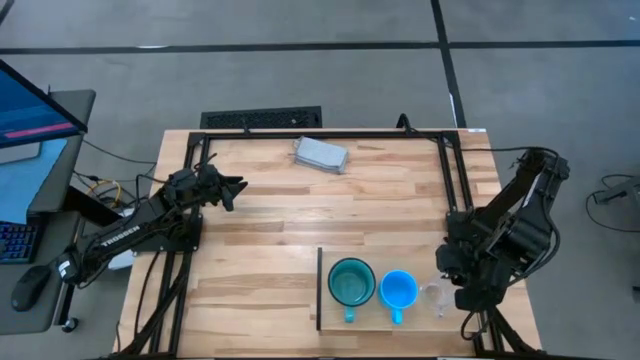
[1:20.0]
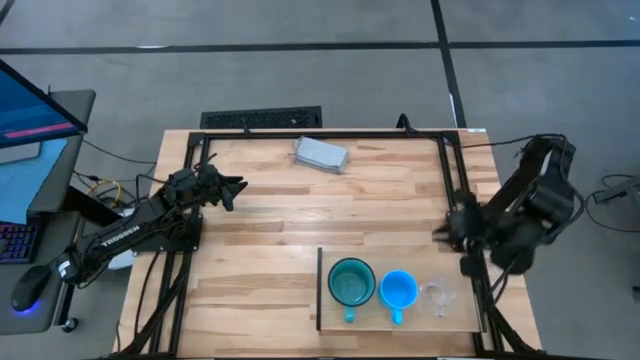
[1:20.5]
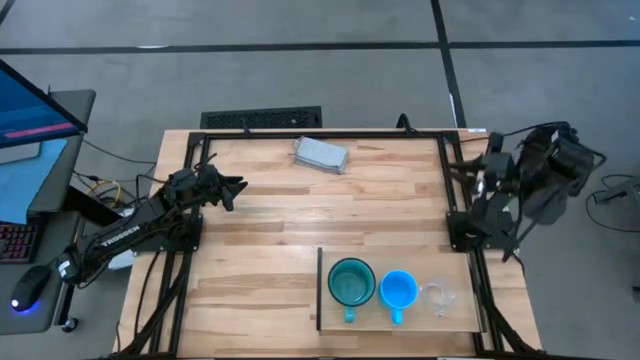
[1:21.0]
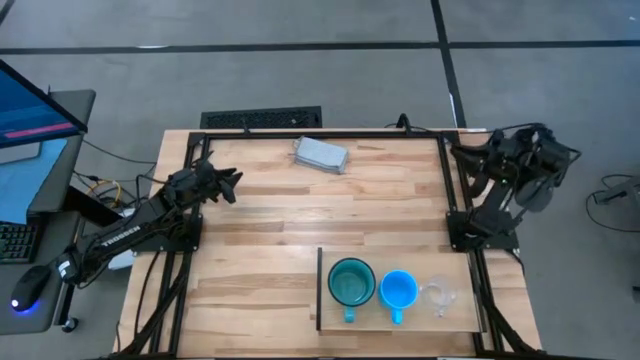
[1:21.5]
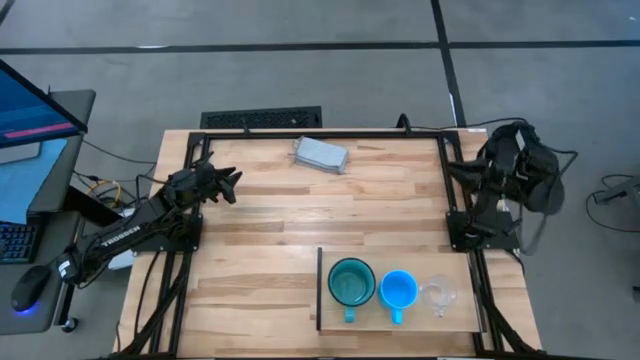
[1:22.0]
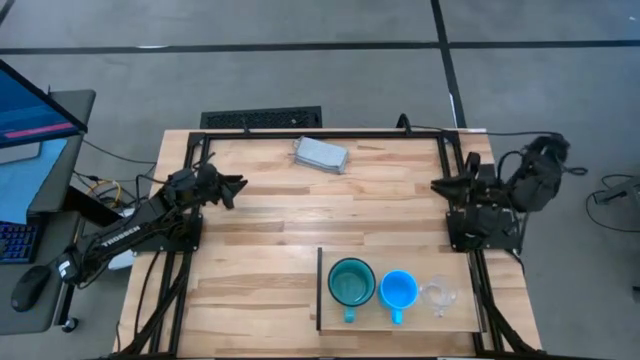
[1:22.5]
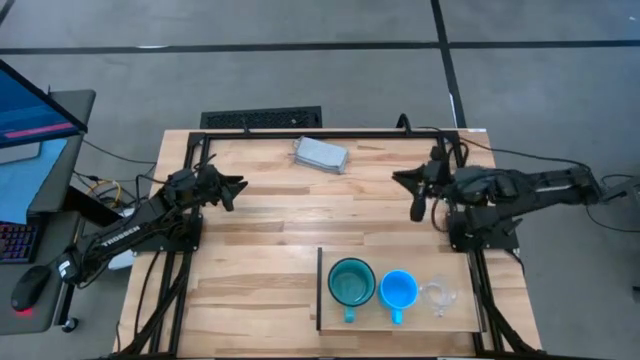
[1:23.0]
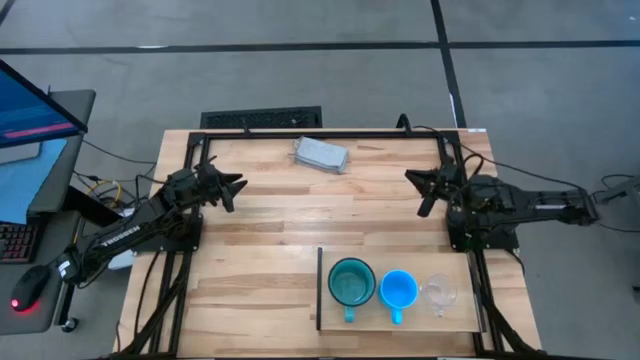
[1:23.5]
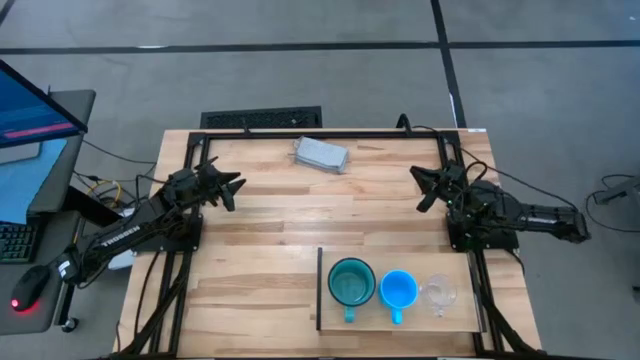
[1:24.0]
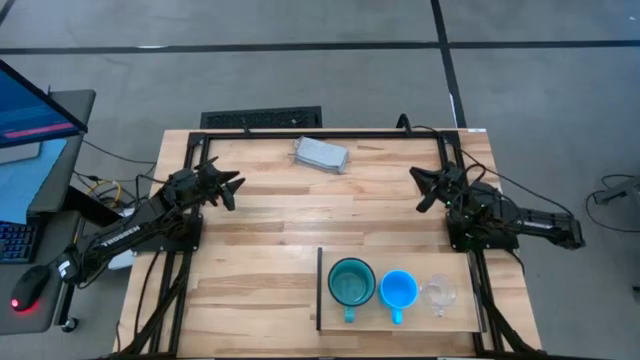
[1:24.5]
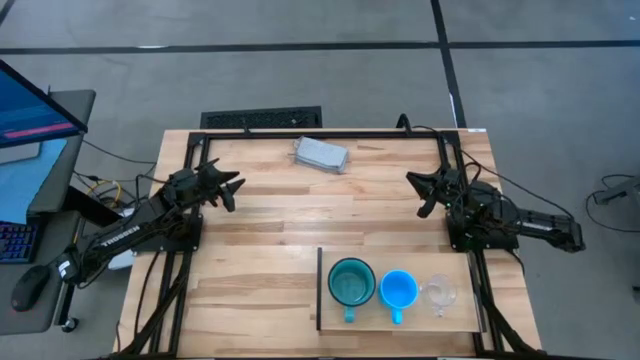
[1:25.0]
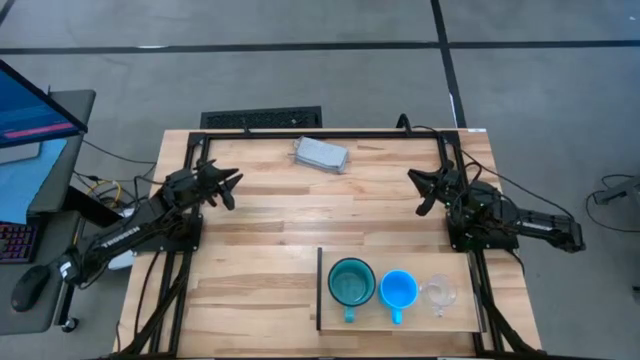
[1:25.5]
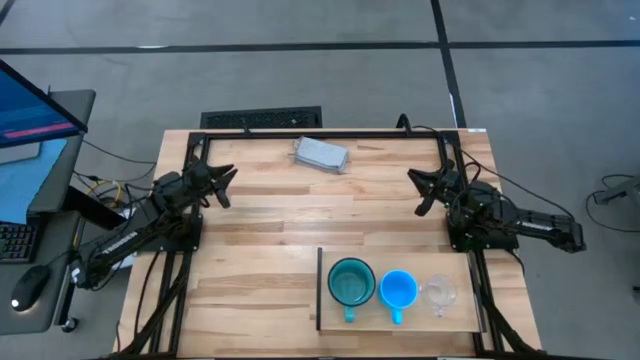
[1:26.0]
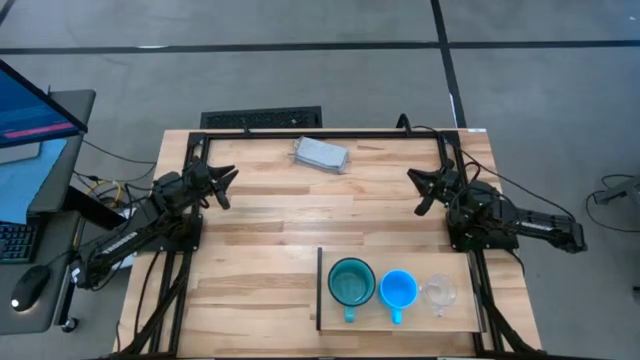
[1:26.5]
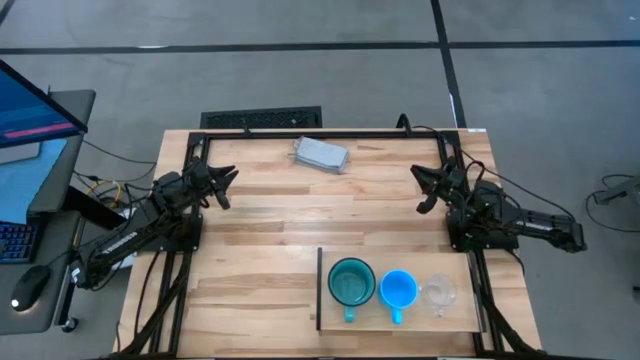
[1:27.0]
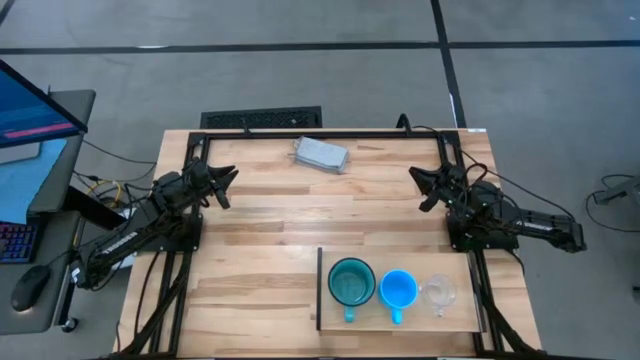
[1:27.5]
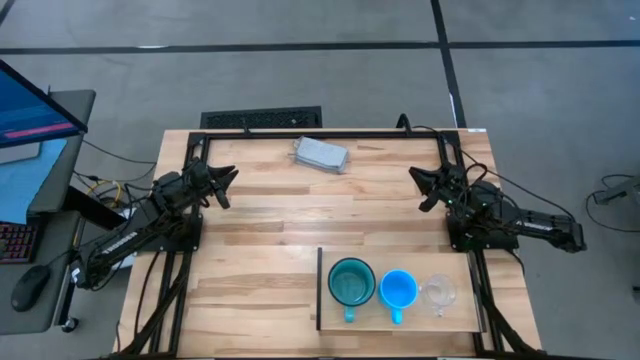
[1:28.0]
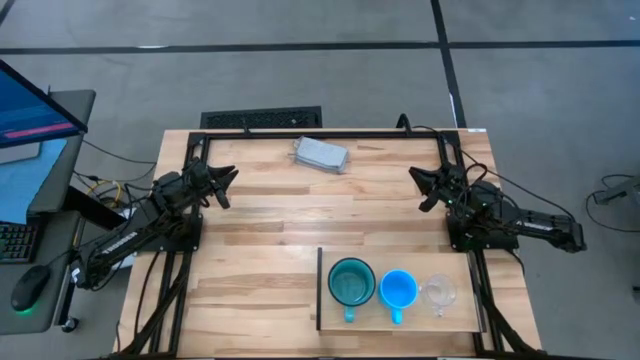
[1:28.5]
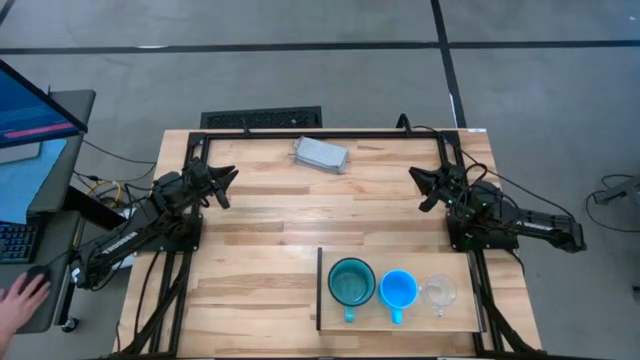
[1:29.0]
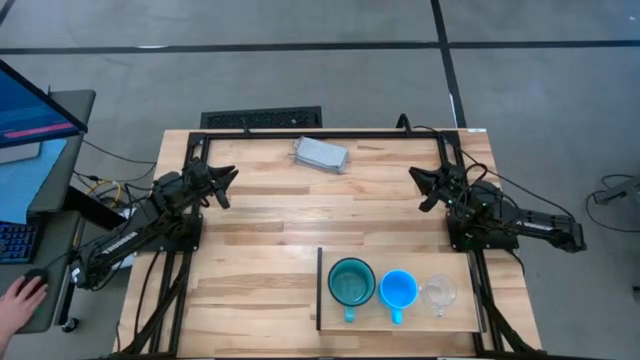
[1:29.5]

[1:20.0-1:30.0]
Task: Stack small to large cups/mugs on shelf
Return to Home Position

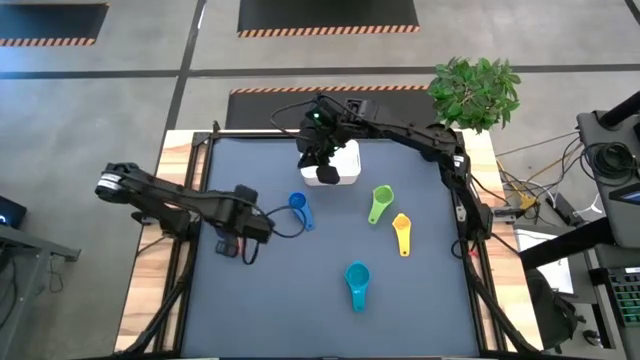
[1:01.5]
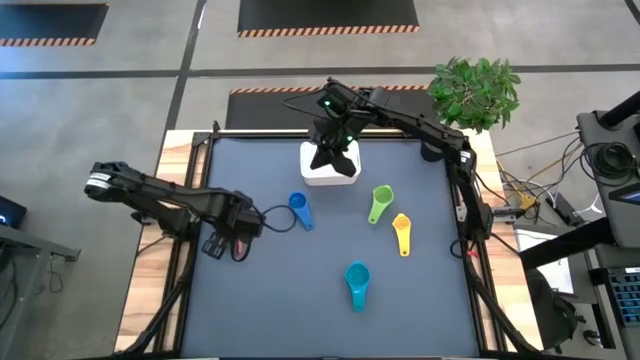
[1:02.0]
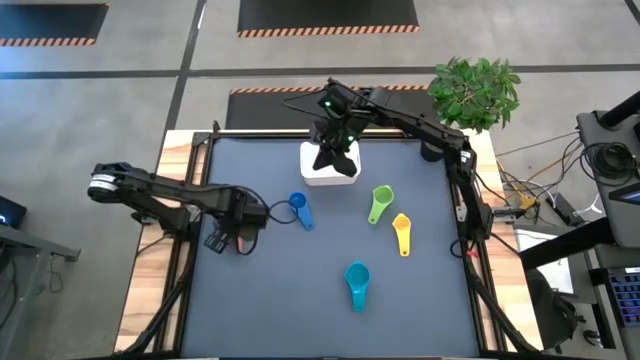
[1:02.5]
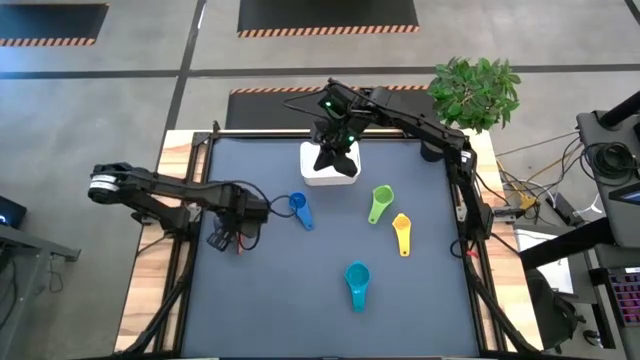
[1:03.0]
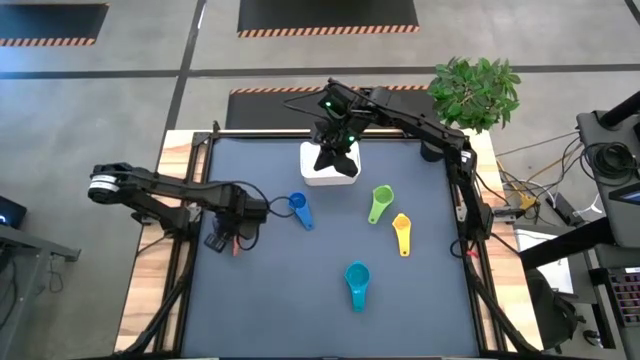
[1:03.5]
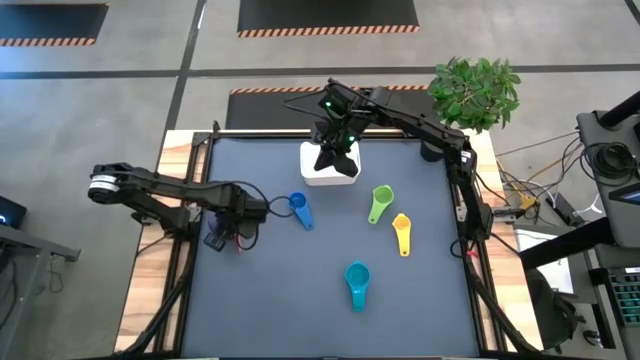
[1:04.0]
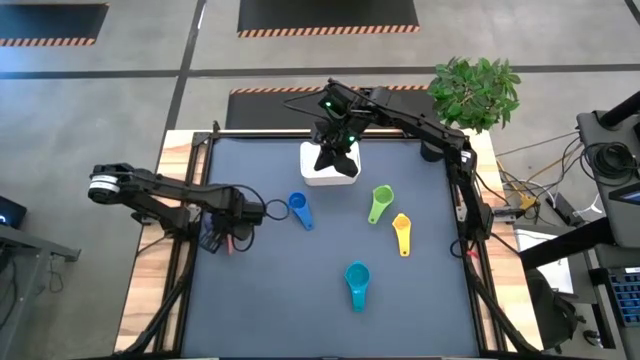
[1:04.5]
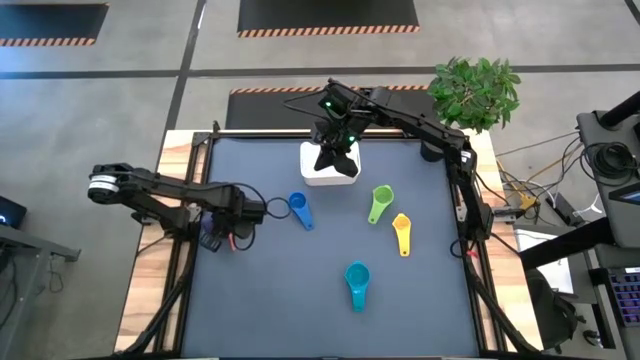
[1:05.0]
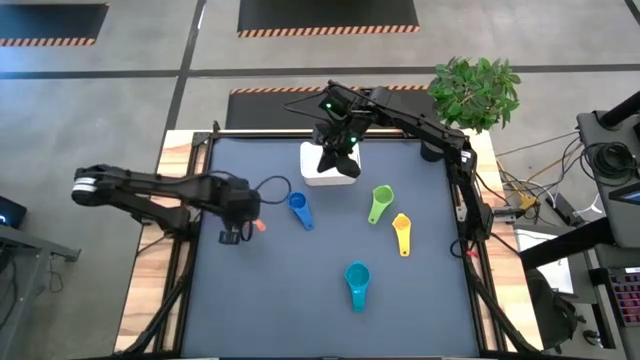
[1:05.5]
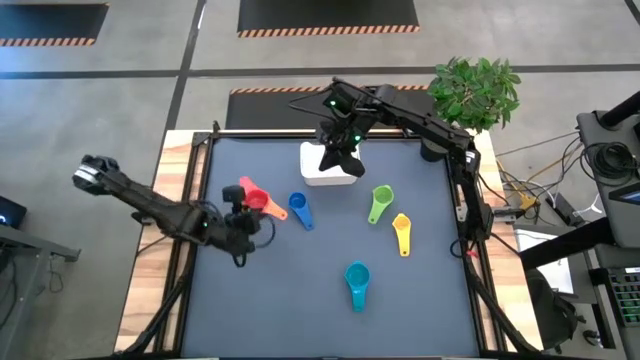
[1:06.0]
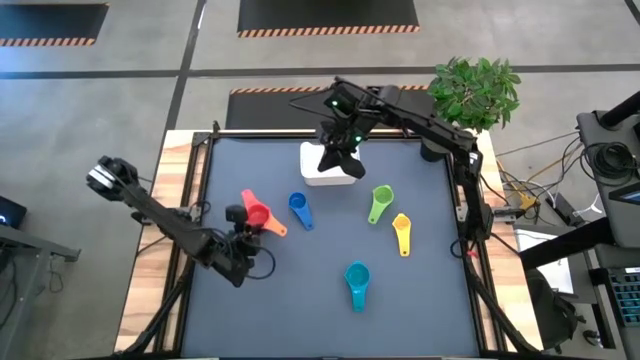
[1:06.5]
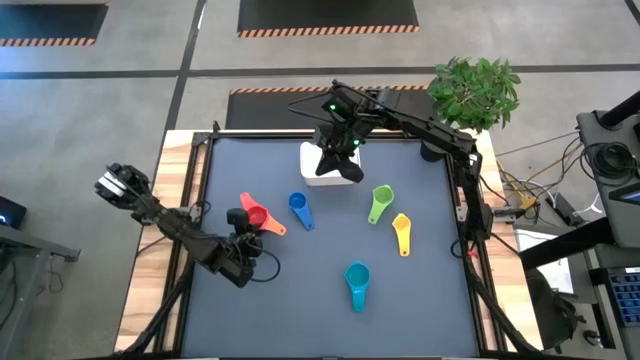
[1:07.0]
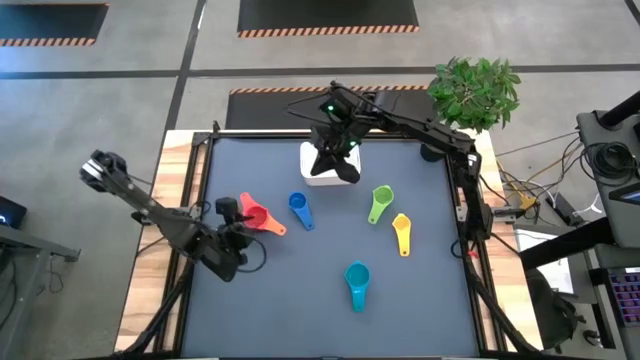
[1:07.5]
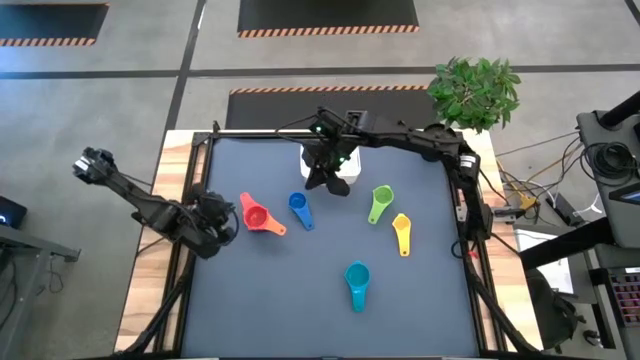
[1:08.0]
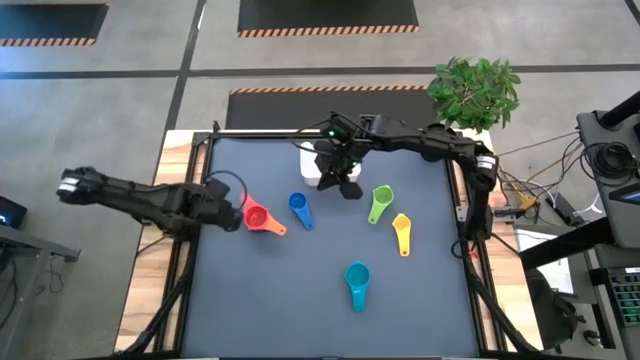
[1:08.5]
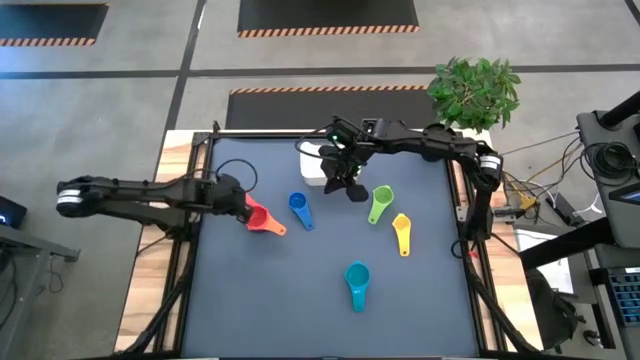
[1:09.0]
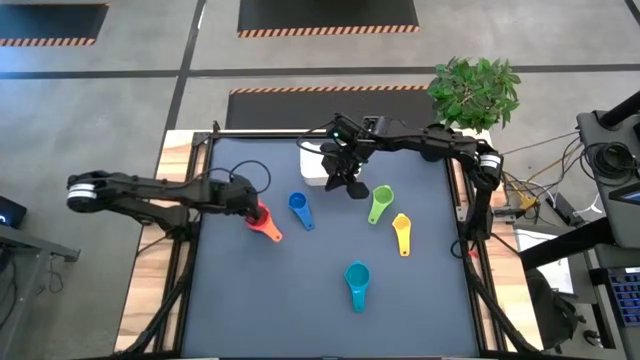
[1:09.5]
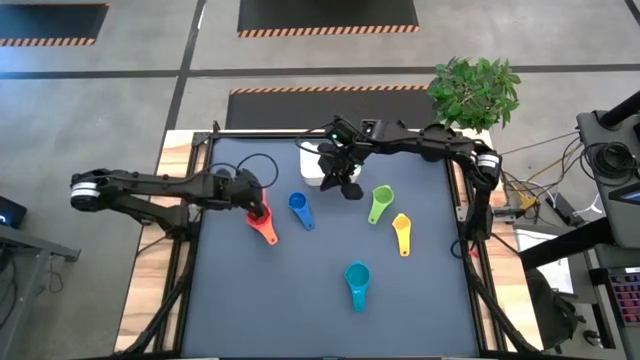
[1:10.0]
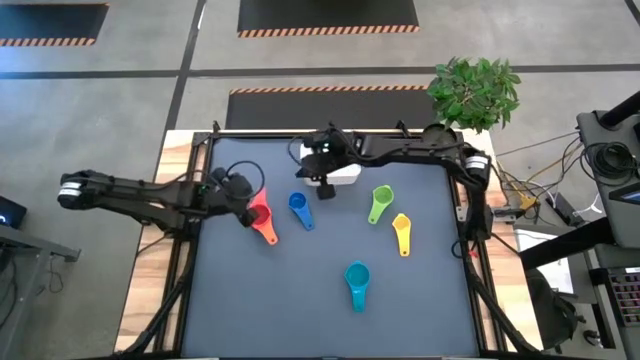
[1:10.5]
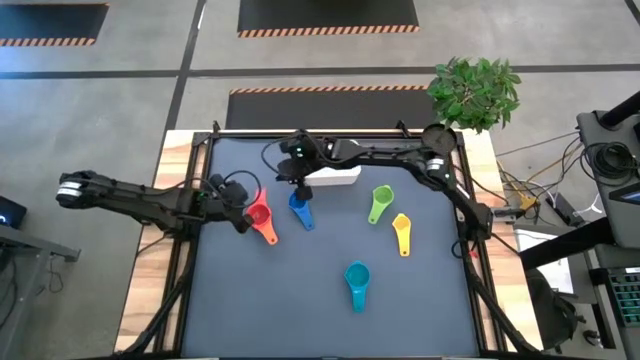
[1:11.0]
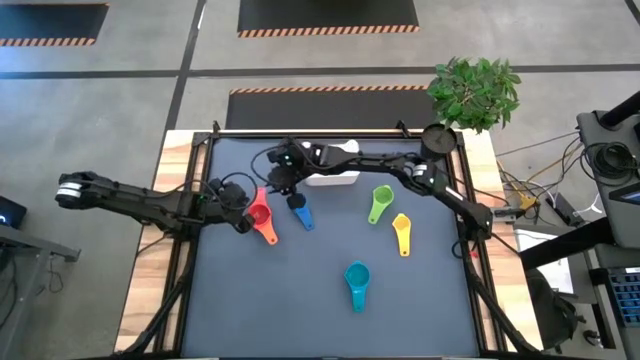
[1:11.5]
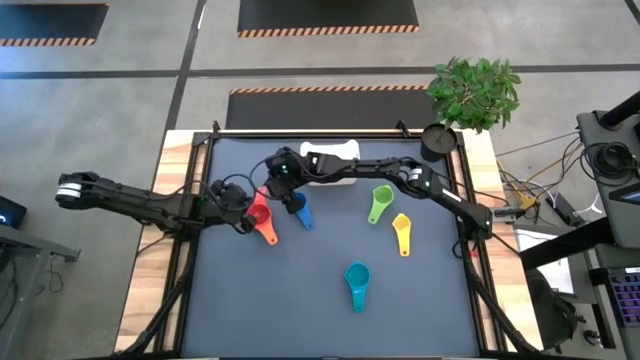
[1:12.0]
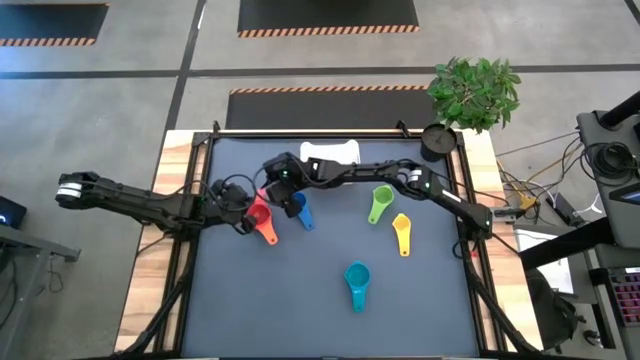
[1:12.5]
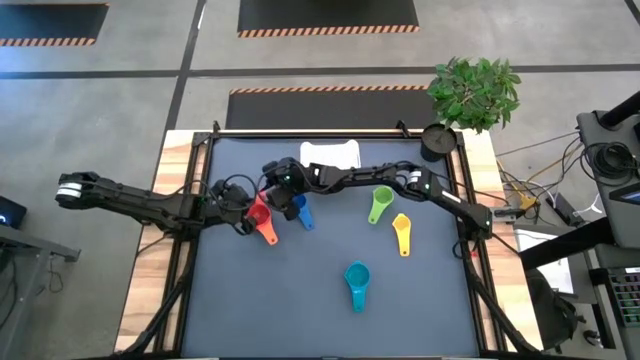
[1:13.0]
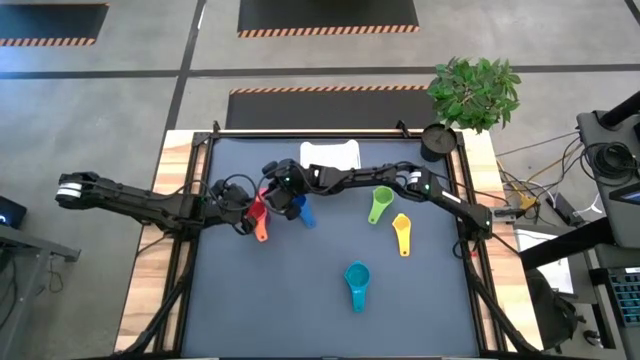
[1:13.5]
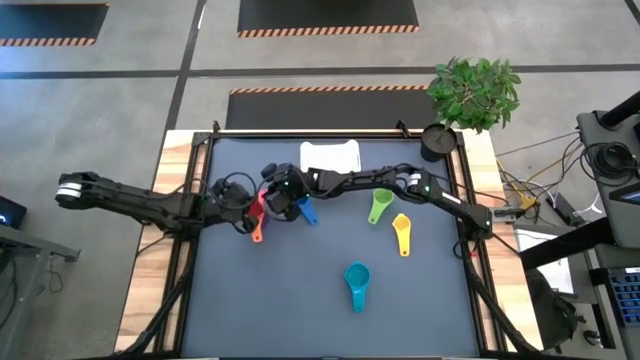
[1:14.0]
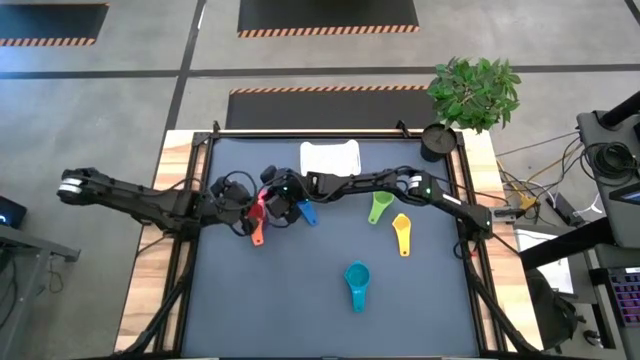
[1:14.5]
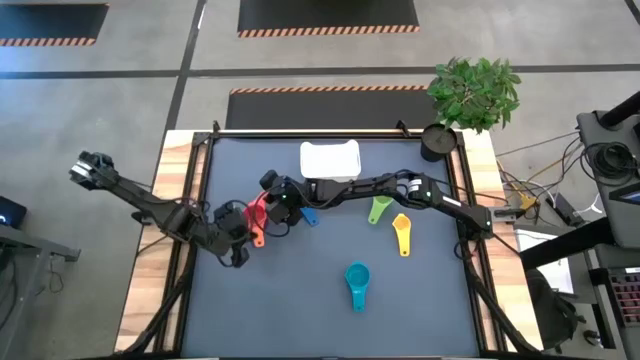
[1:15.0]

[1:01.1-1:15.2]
Task: Nest measuring cups in basket
Stack the red measuring cup on top of the orange measuring cup
